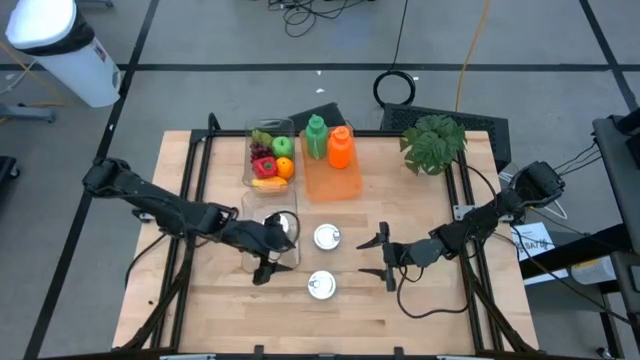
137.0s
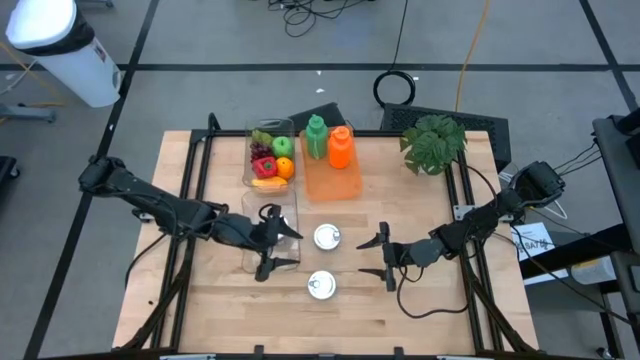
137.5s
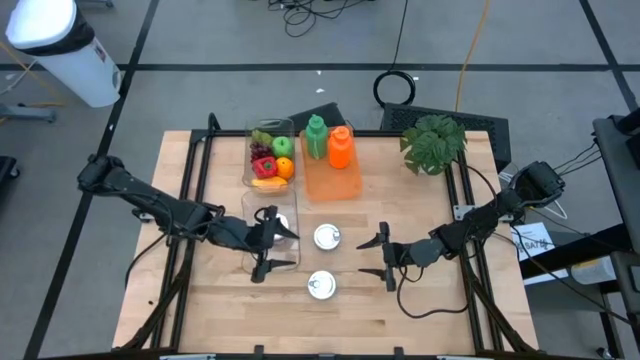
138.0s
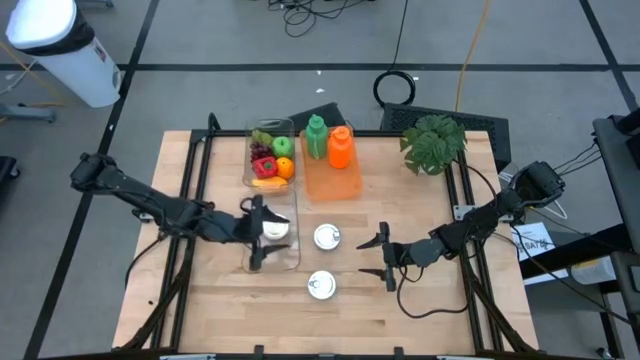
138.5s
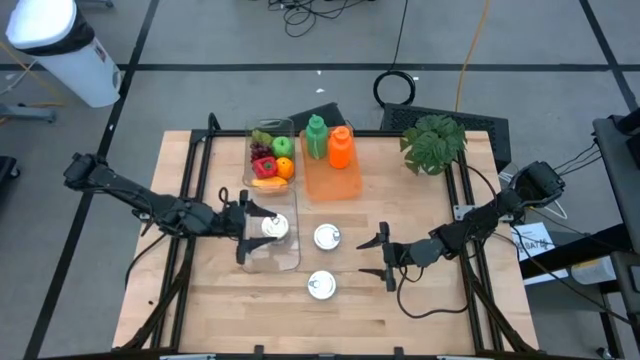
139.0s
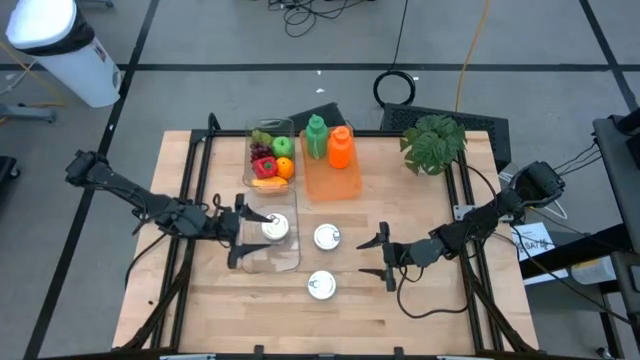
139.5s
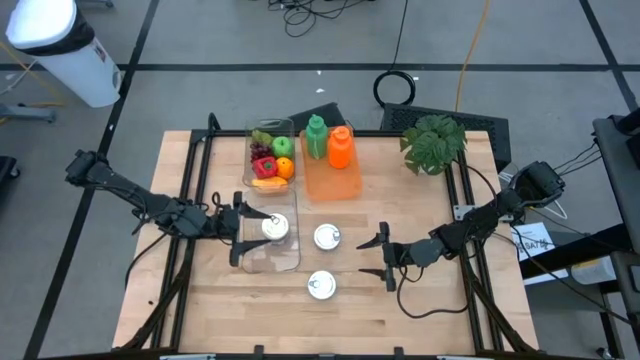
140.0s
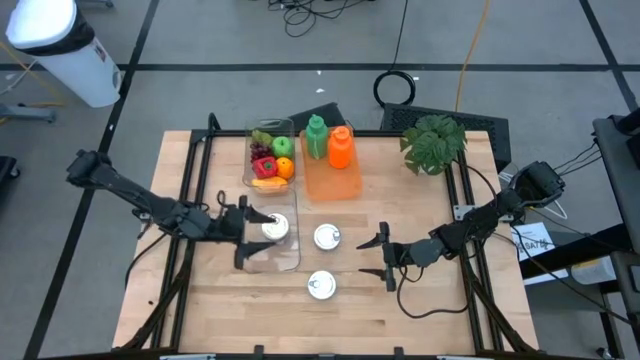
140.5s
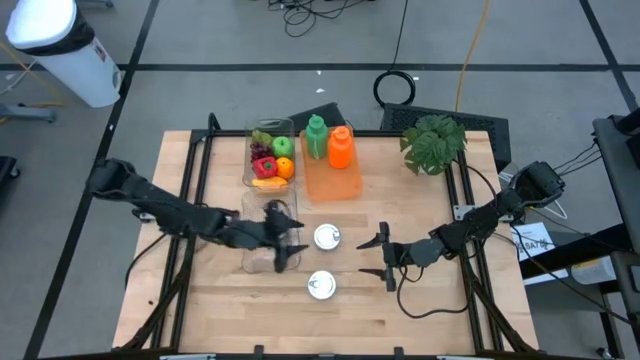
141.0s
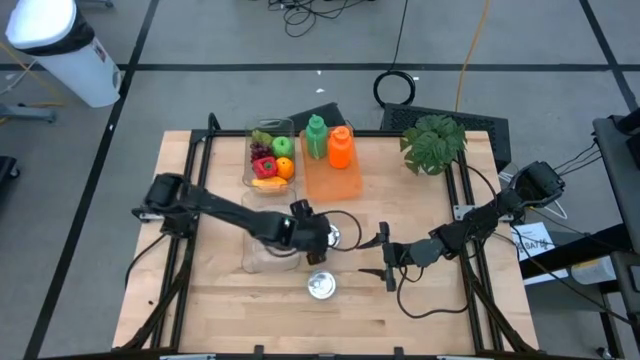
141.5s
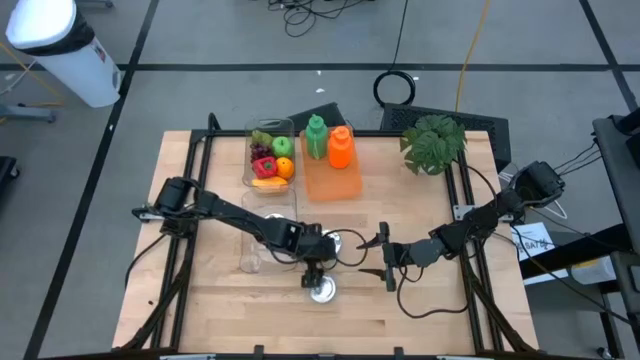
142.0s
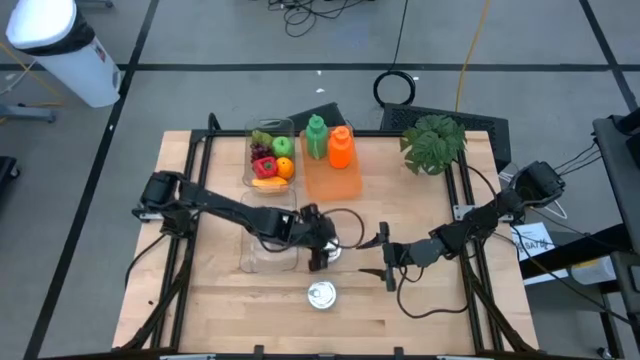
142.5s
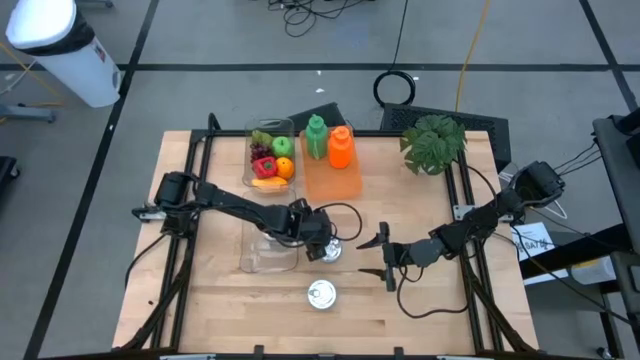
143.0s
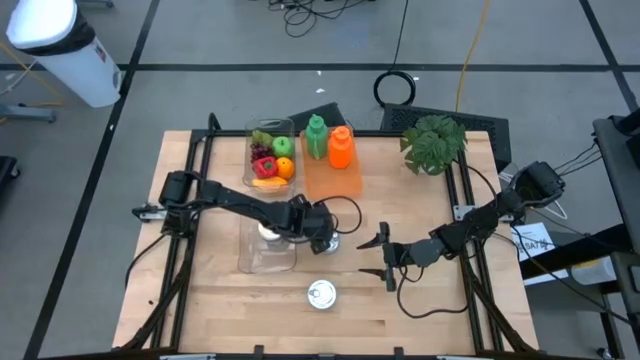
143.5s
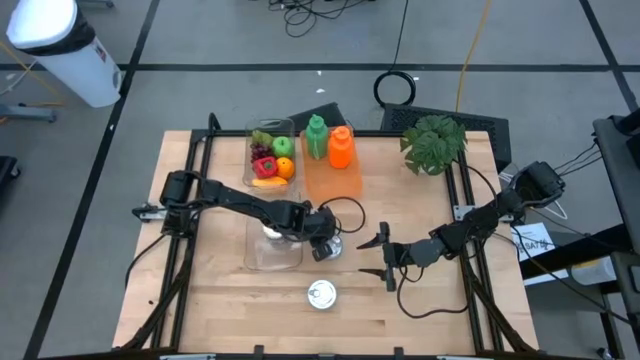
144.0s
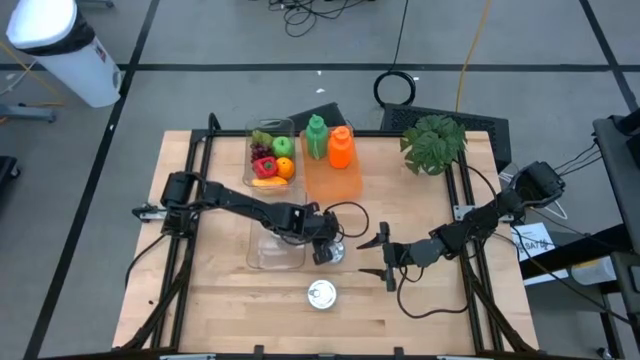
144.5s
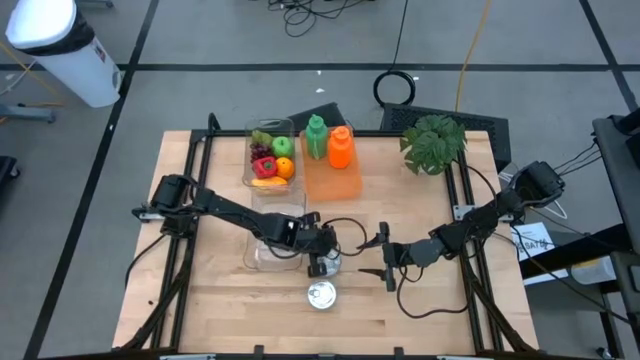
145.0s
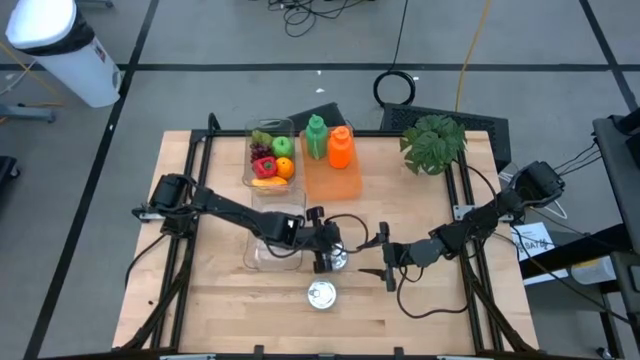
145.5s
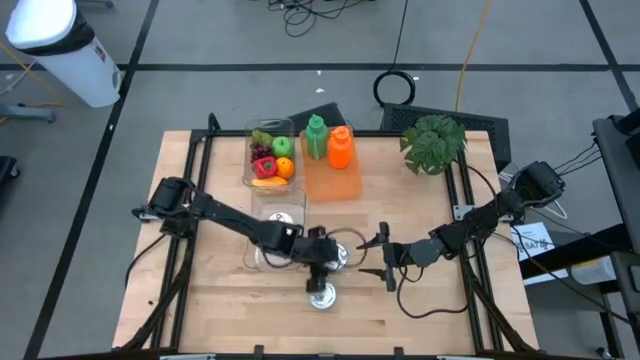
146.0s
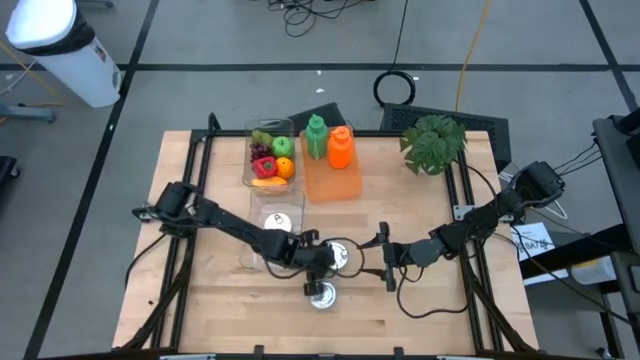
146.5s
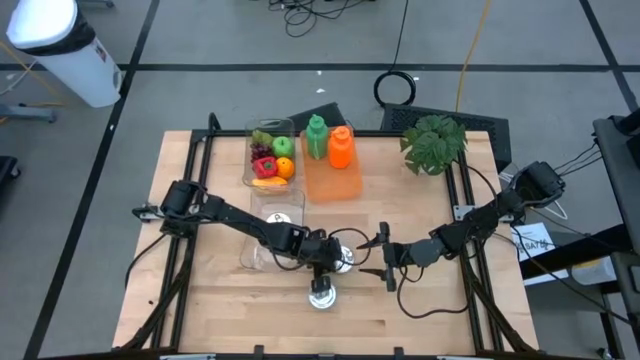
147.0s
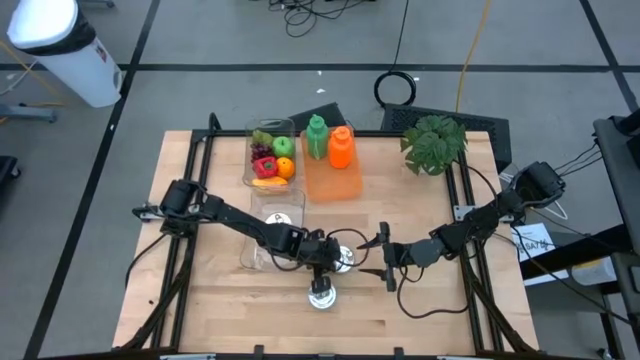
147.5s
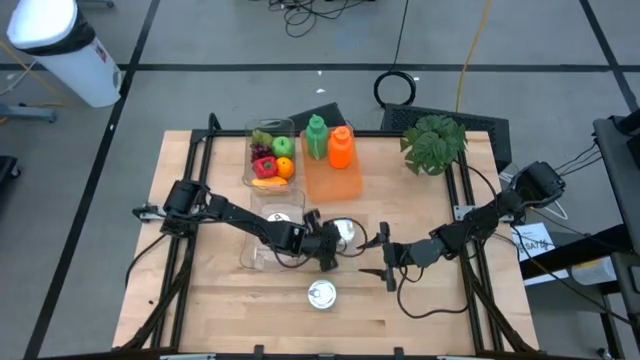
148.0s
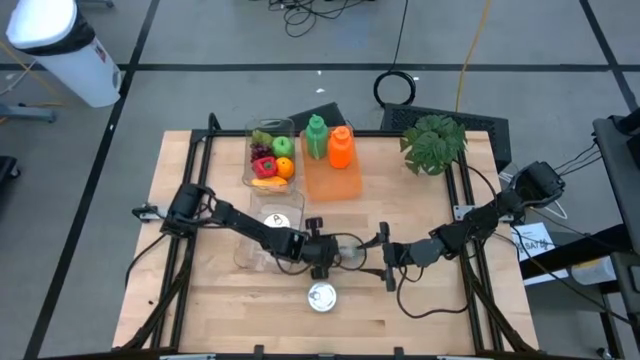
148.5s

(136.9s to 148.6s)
Task: Pick & Place Food Item
Put the top green tuna can into the bottom transparent bin

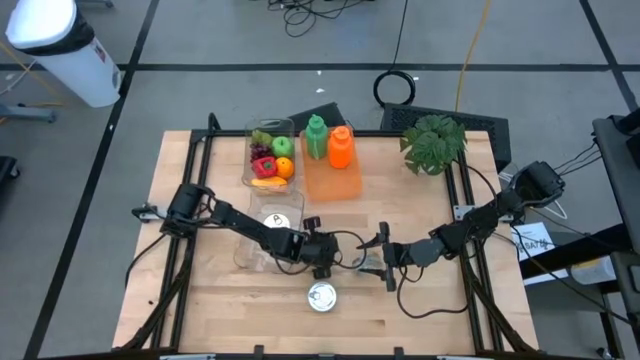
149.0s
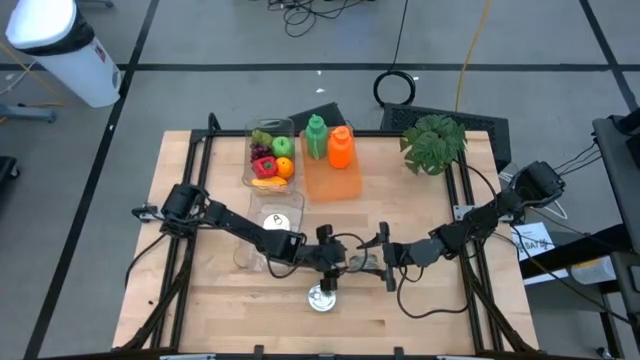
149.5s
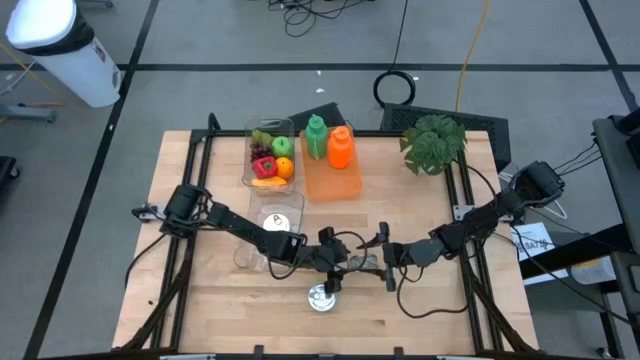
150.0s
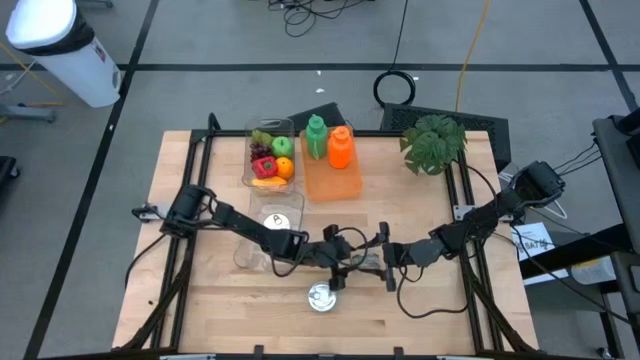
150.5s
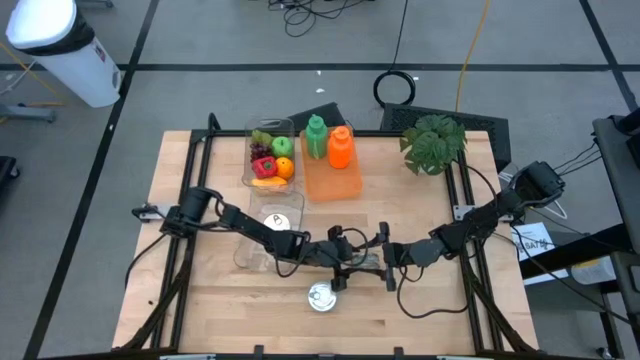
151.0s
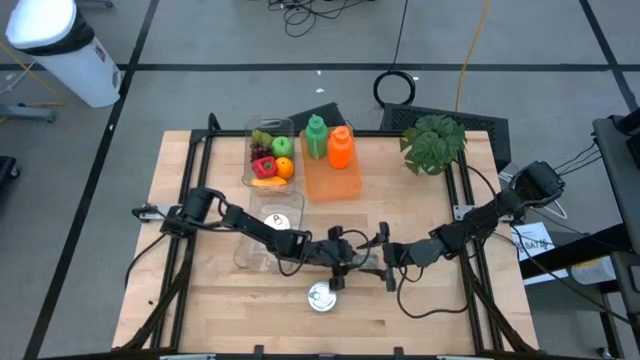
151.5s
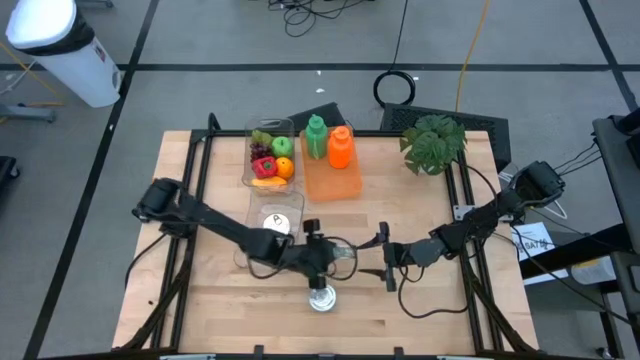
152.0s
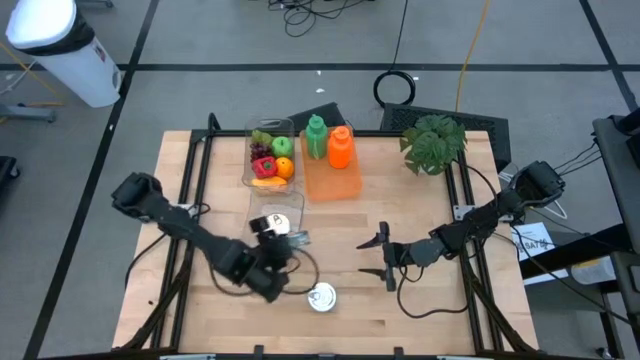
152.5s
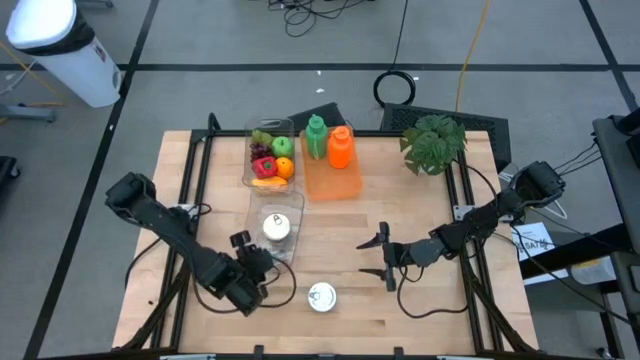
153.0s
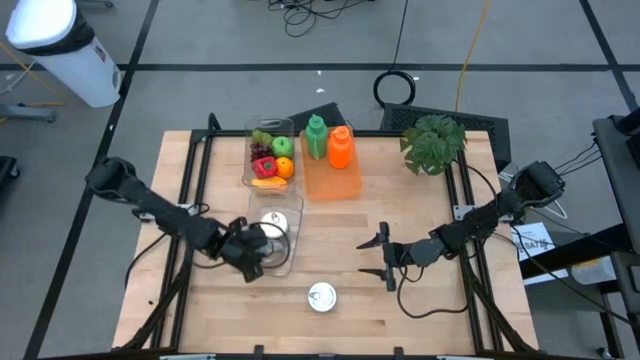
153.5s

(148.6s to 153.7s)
Put the top green tuna can into the bottom transparent bin
